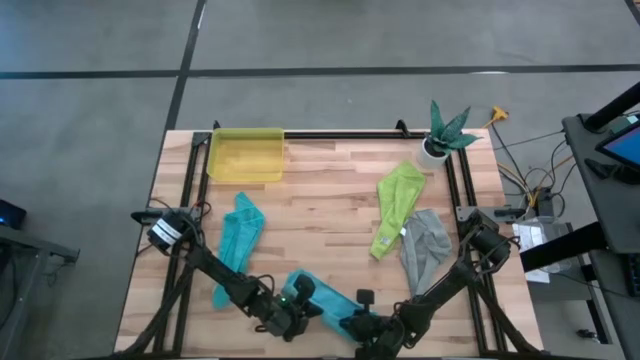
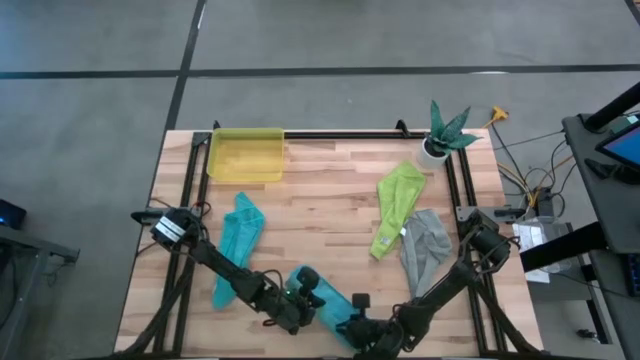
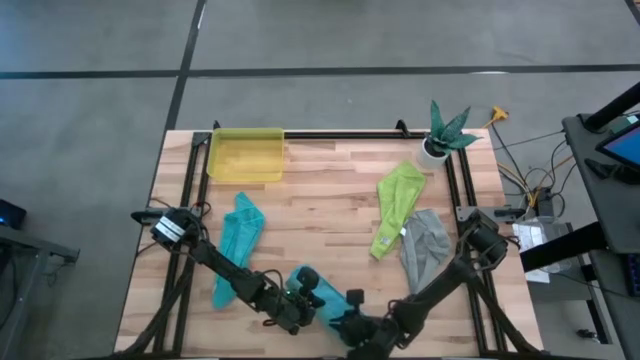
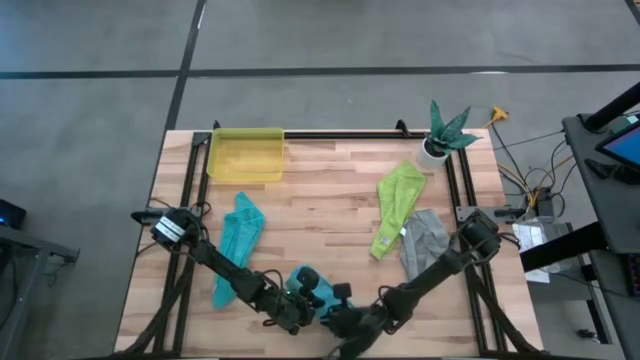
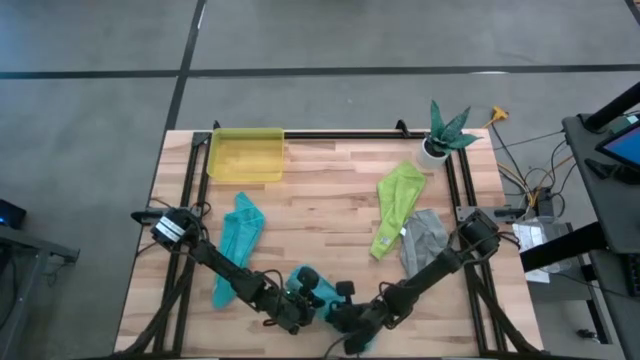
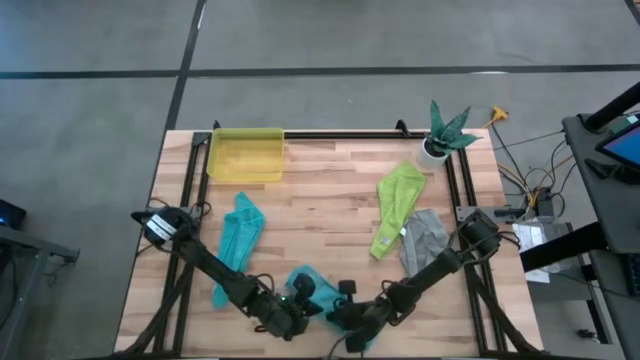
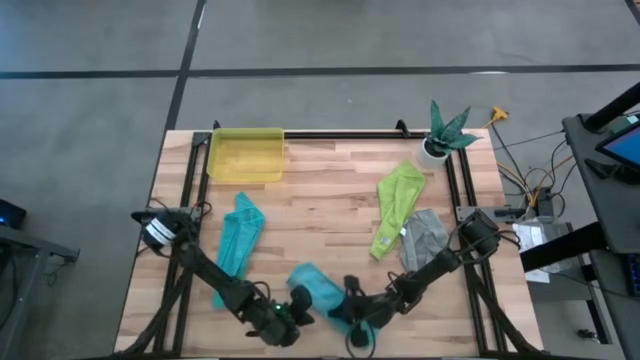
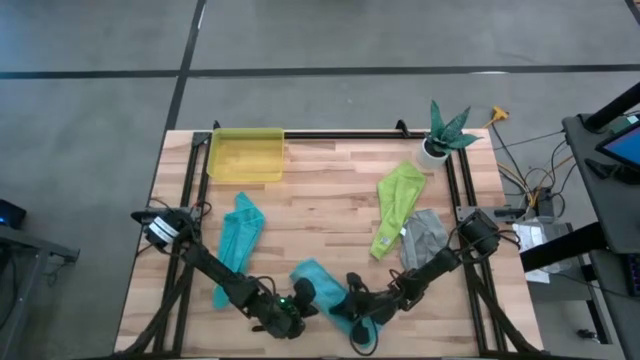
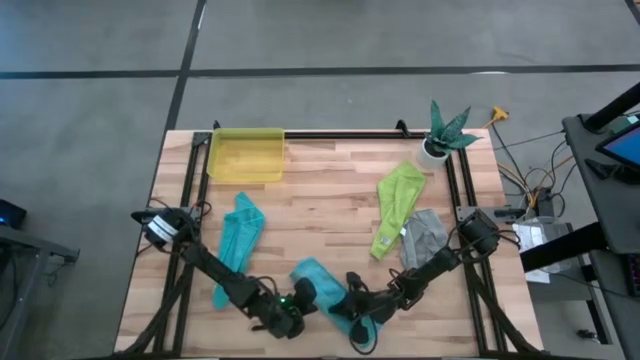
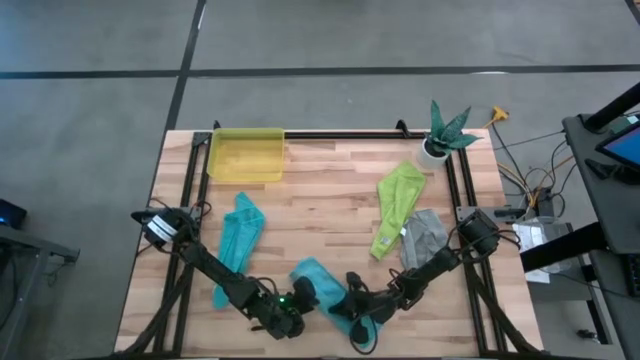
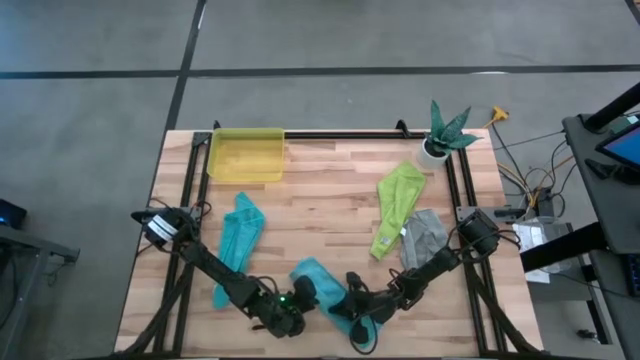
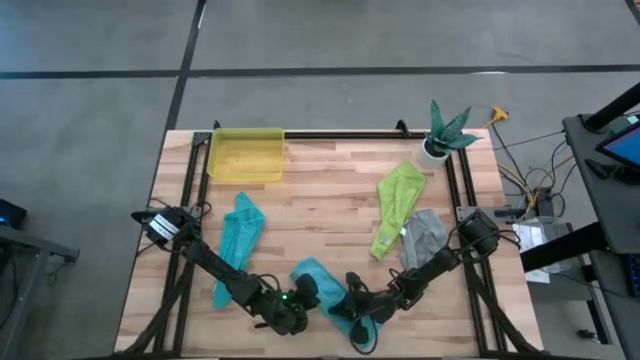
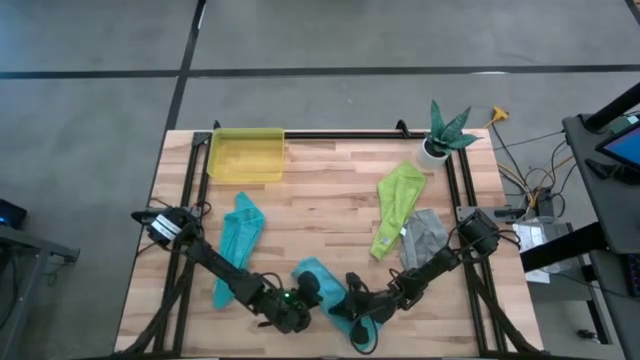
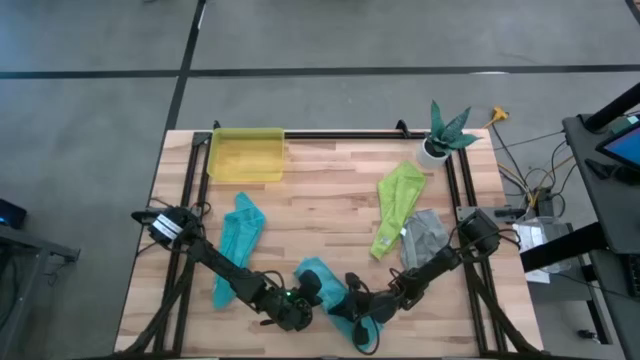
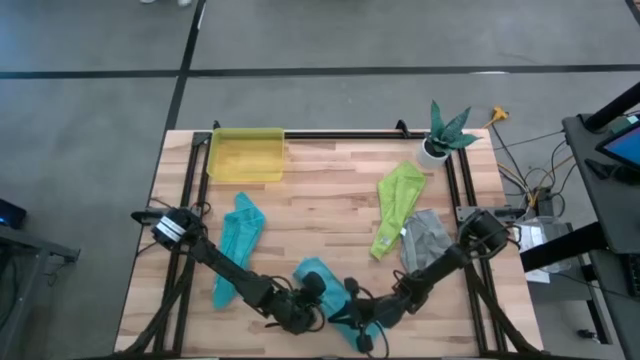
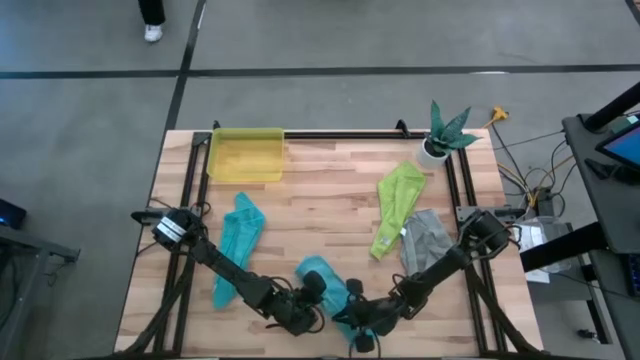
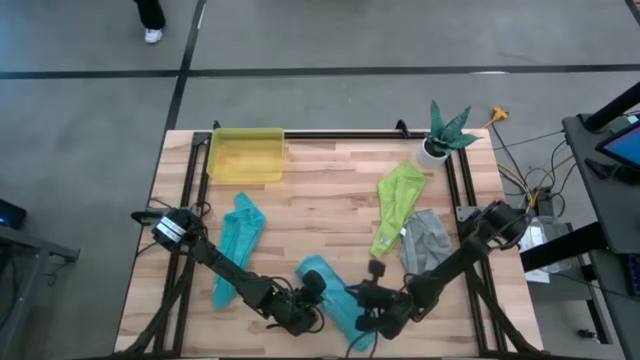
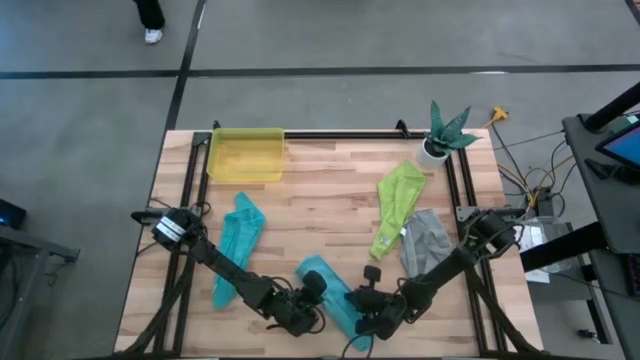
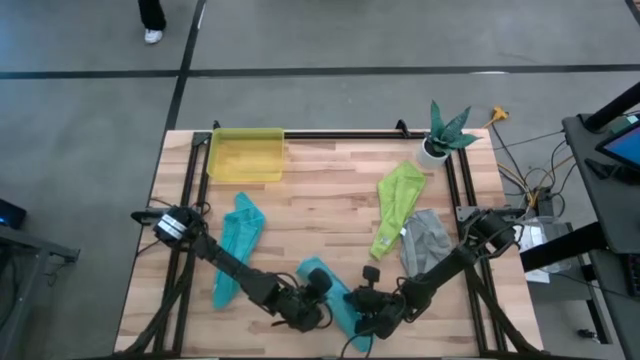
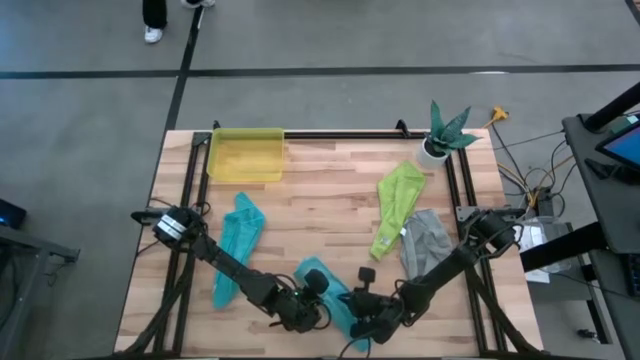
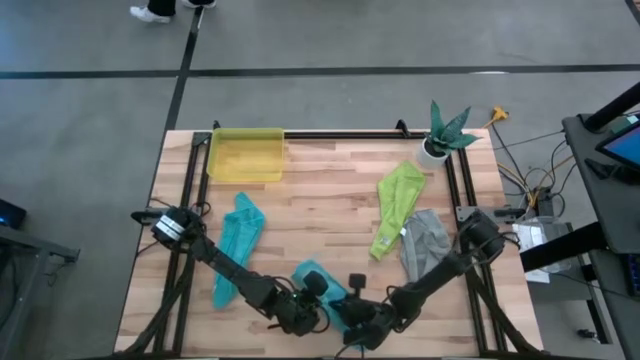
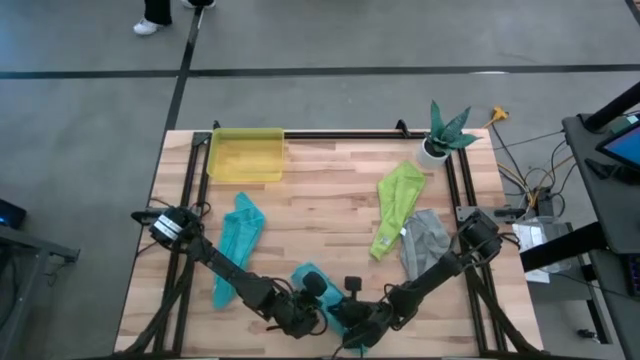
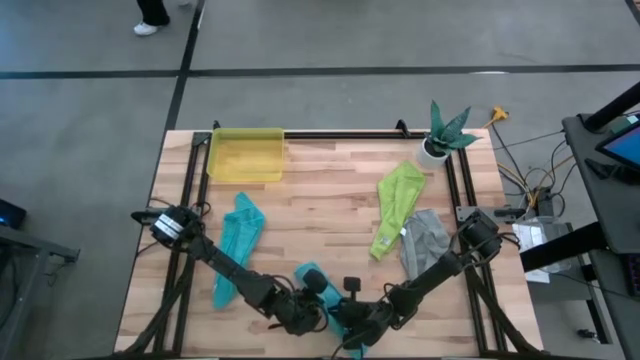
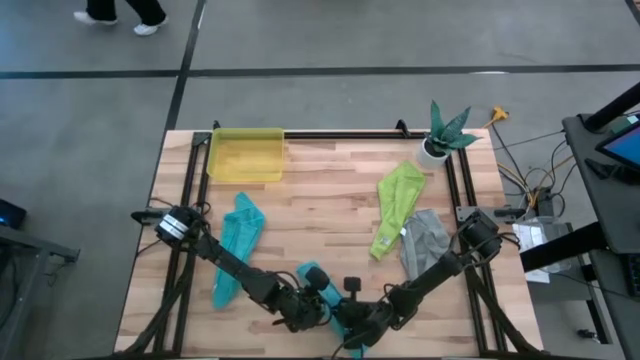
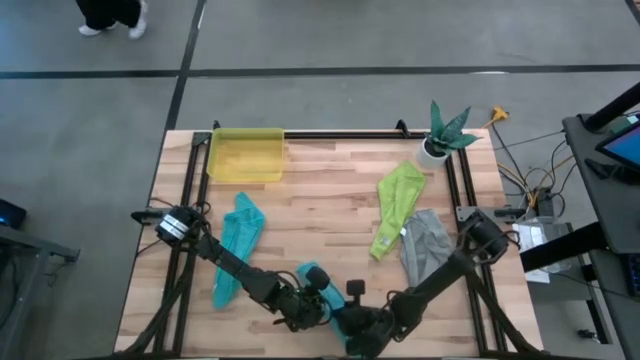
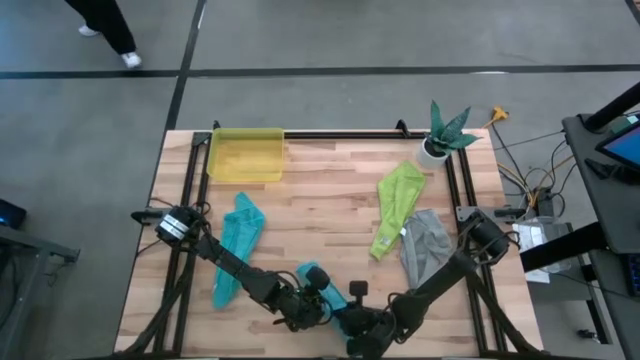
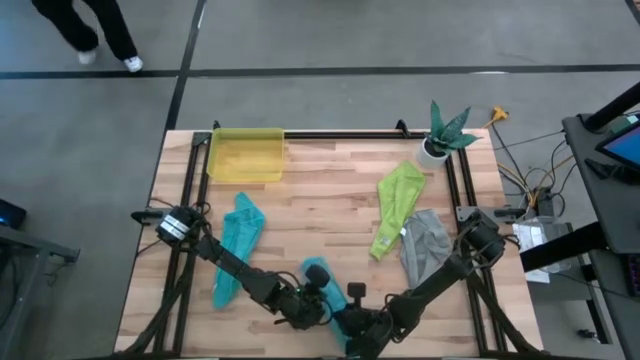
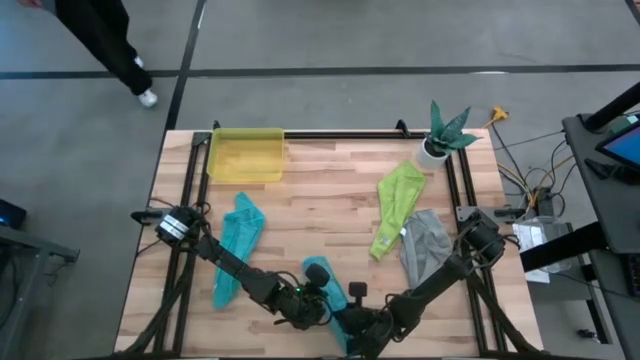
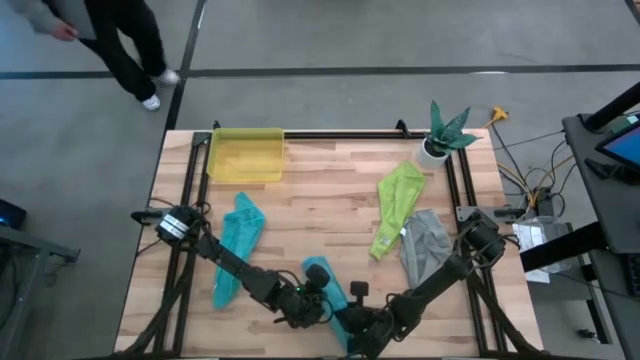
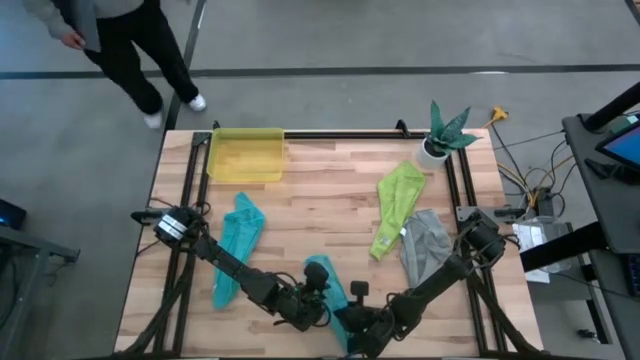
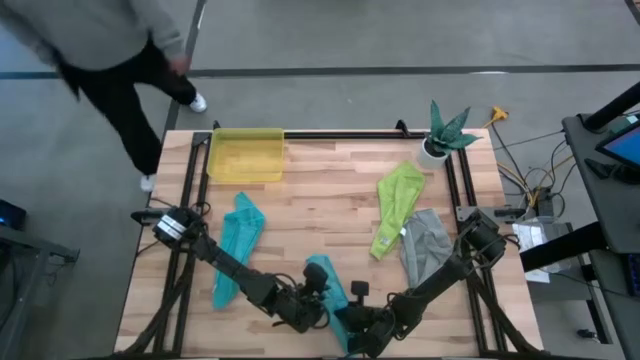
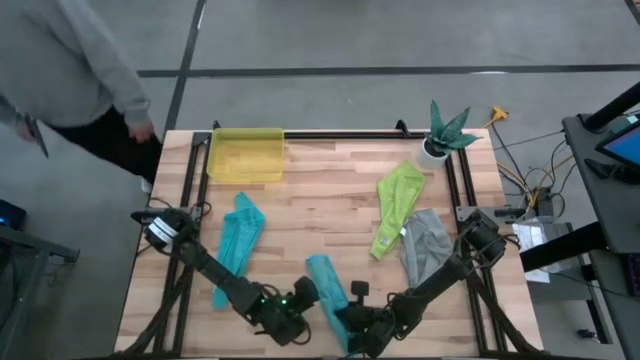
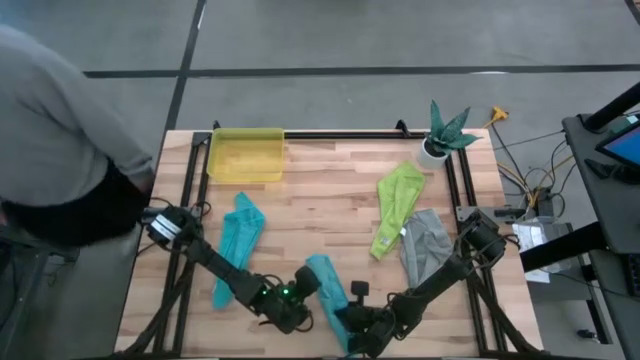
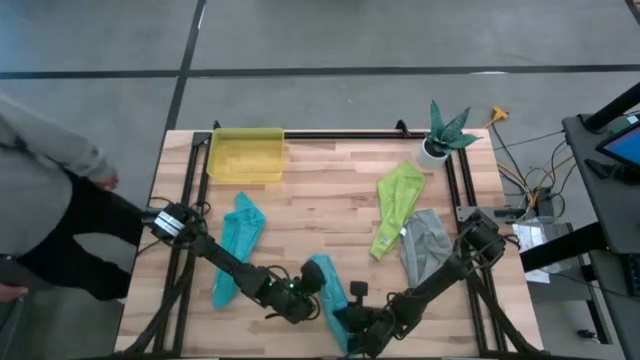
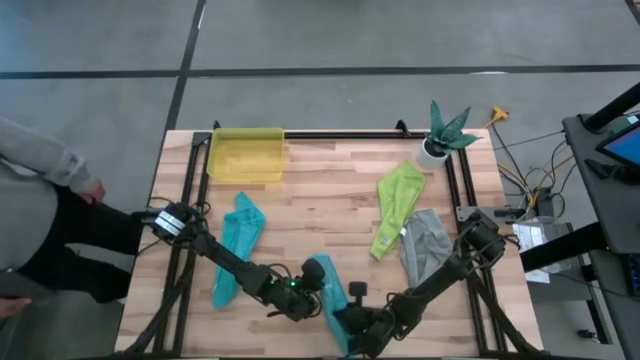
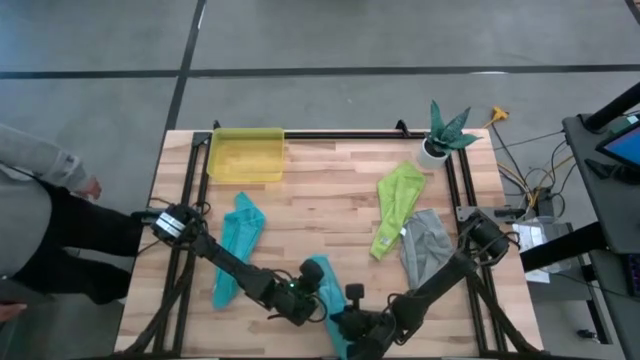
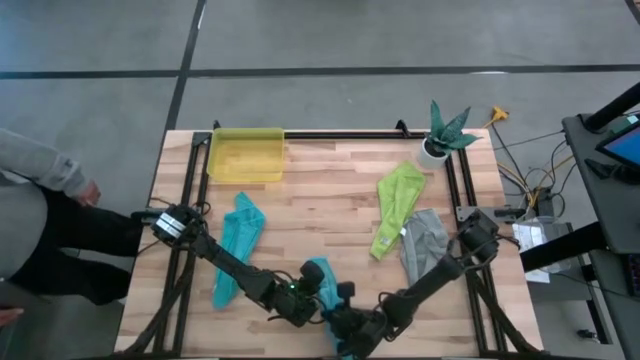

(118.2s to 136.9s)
Task: Roll microfiber towels into tight, uniform cylinder then place into a basket
Roll the right light blue towel
